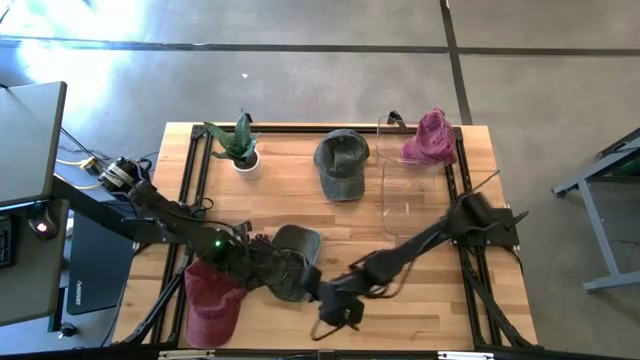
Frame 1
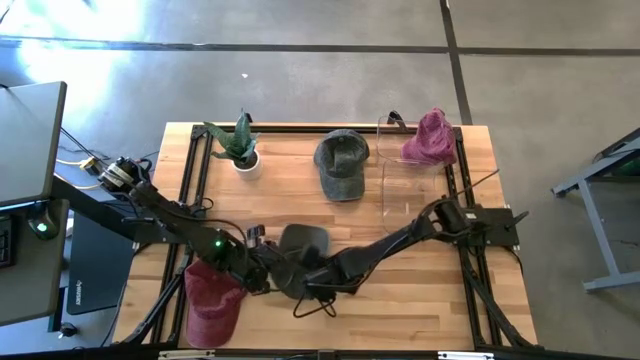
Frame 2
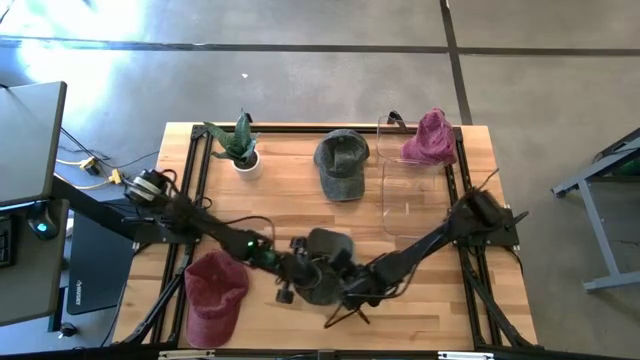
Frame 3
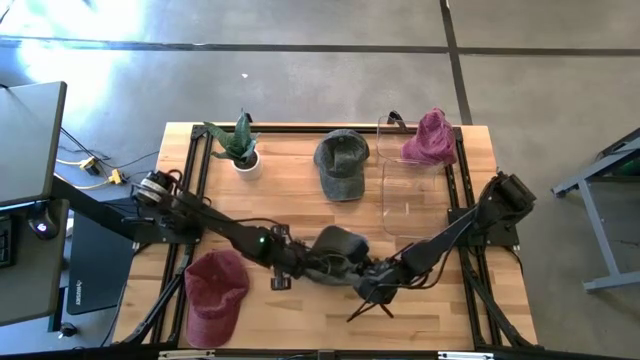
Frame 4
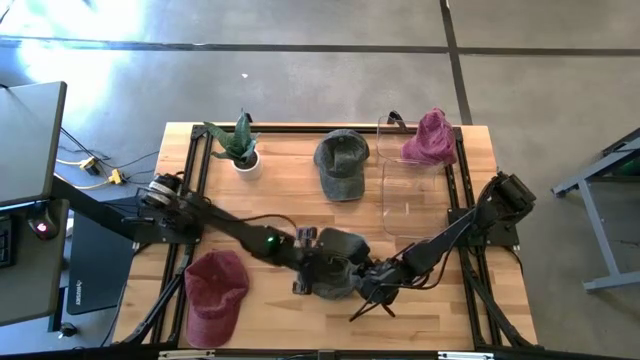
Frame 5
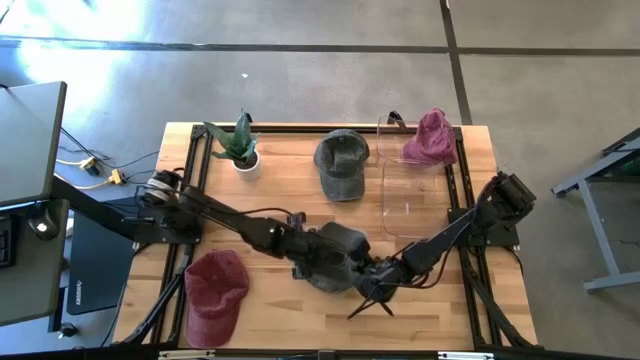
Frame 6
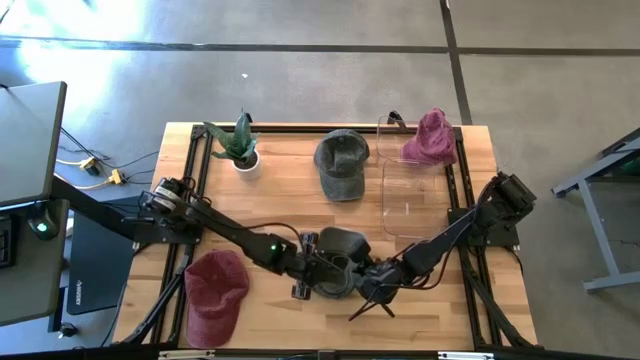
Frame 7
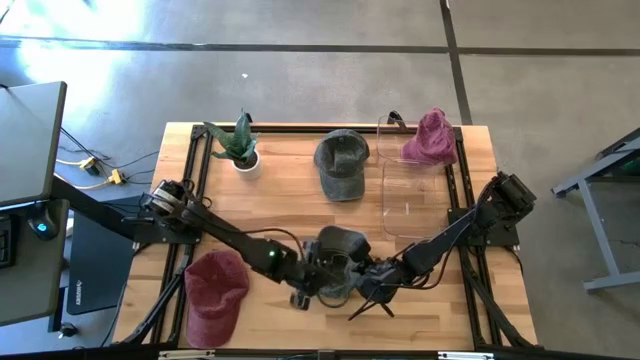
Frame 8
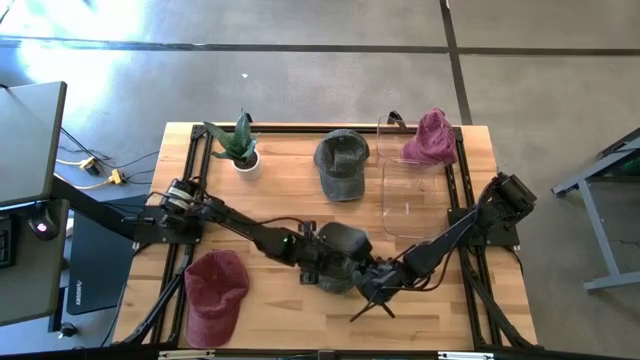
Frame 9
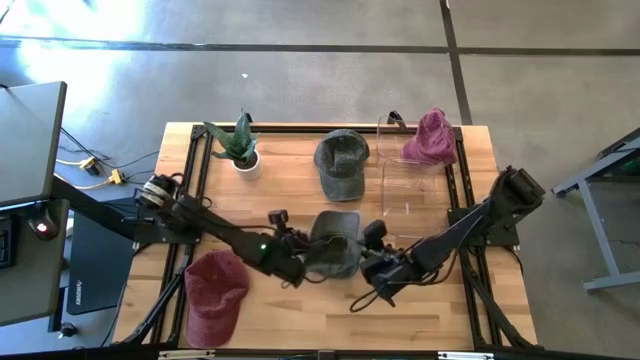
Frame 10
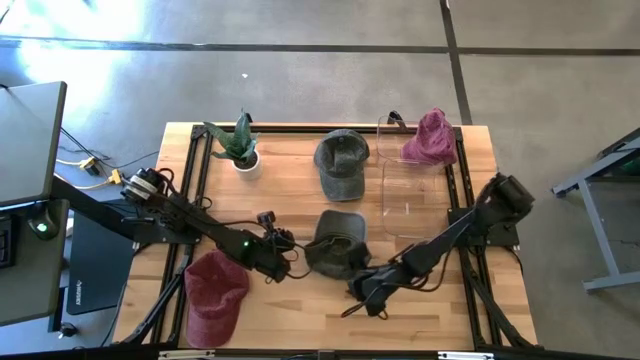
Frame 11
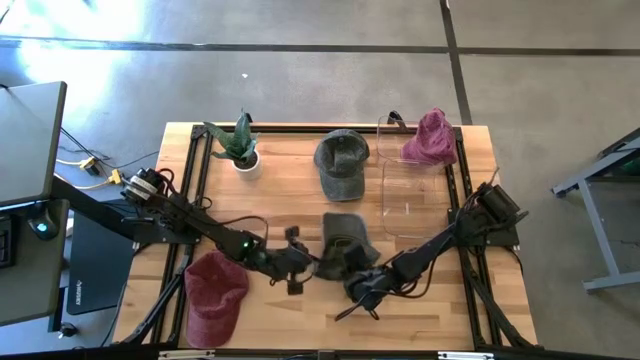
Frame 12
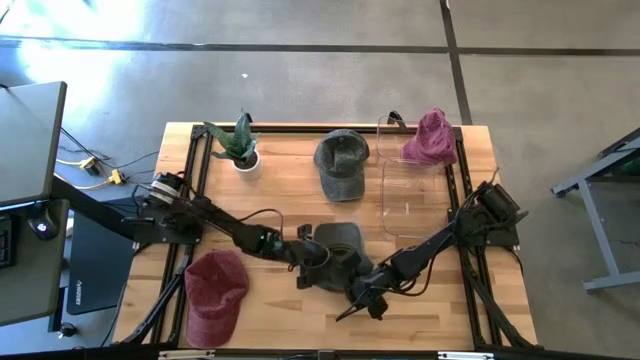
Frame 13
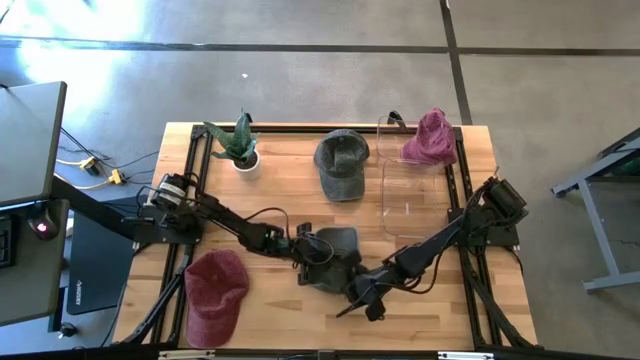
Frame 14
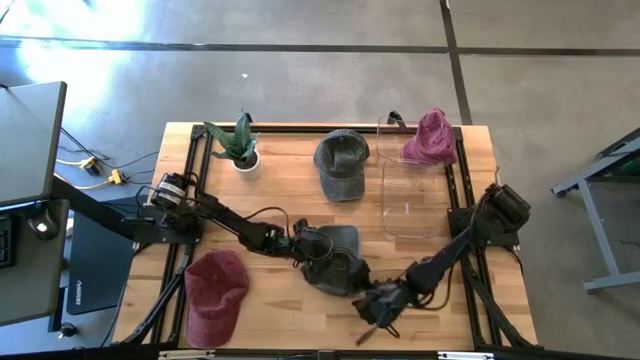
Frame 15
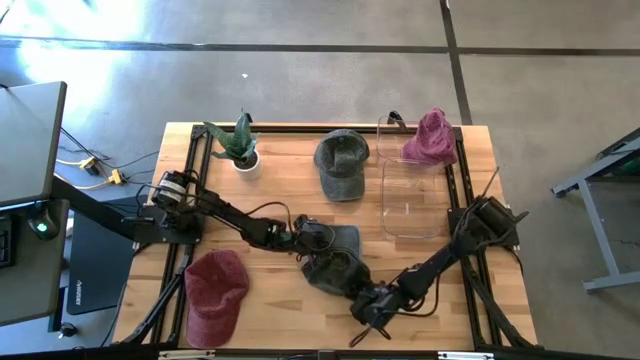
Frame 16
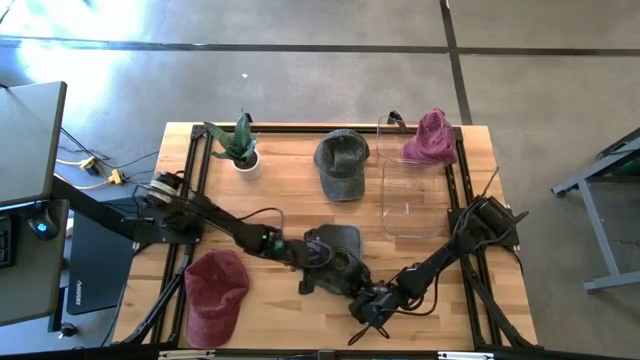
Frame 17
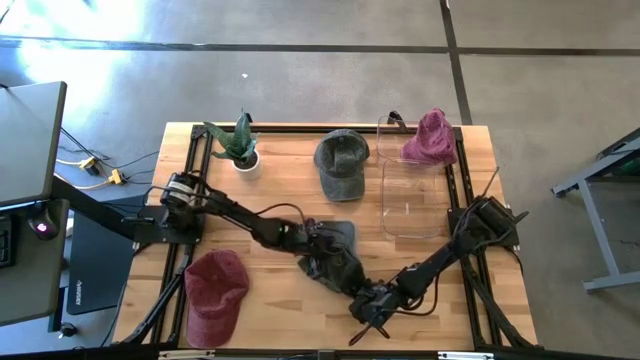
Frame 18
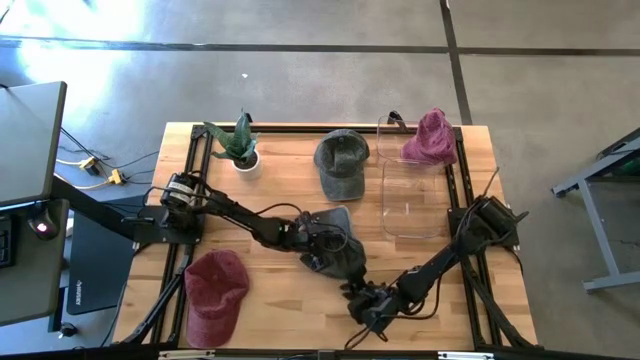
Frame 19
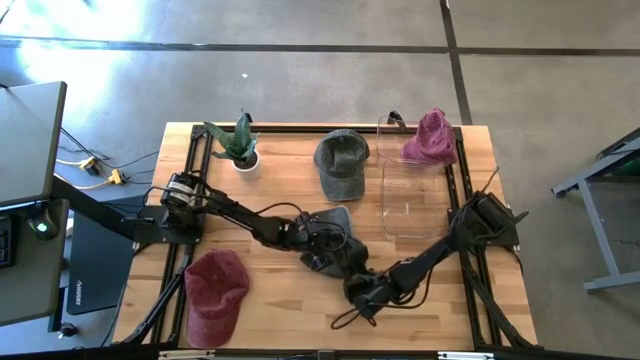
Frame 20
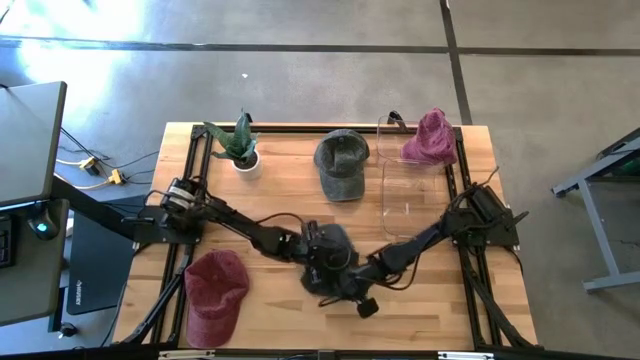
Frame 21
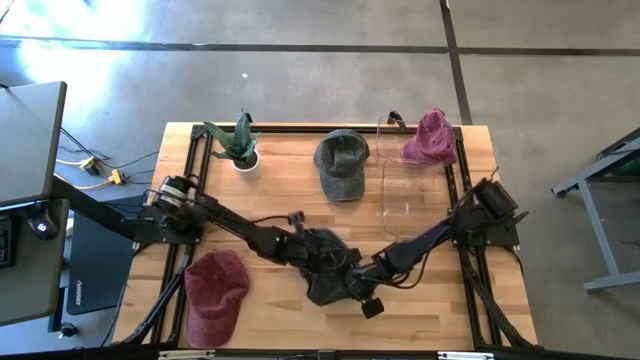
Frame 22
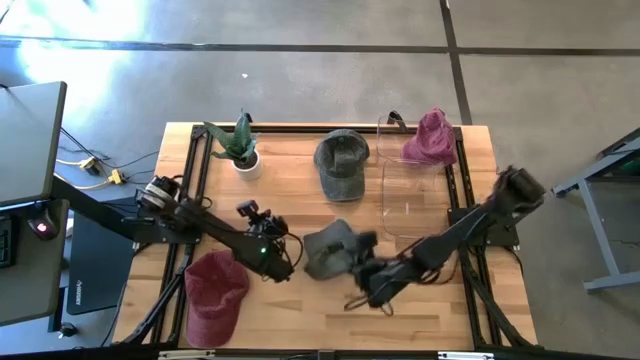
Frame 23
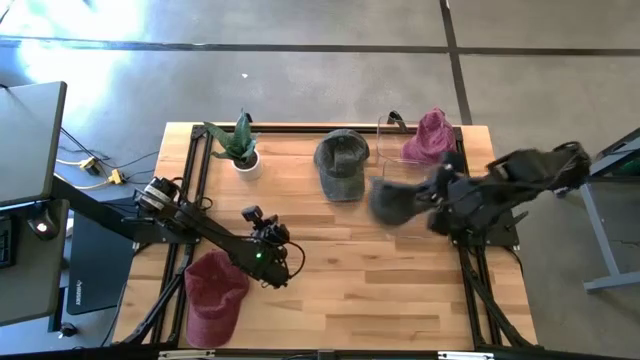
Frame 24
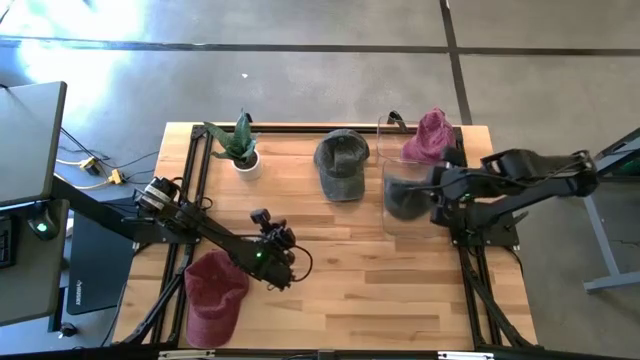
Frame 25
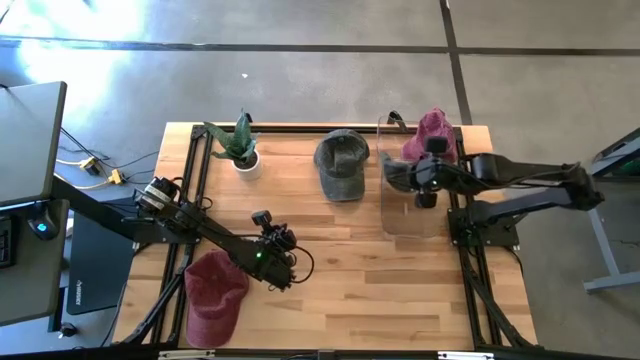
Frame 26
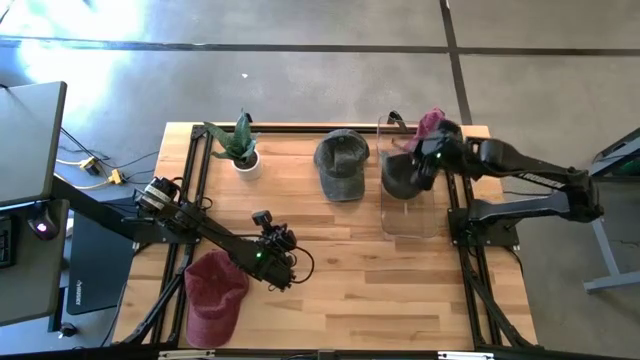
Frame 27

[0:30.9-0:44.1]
Task: Pick & Place hat
Put the bottom gray cap into the bottom transparent bin

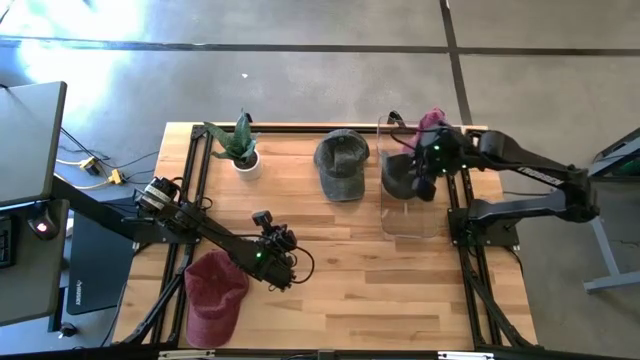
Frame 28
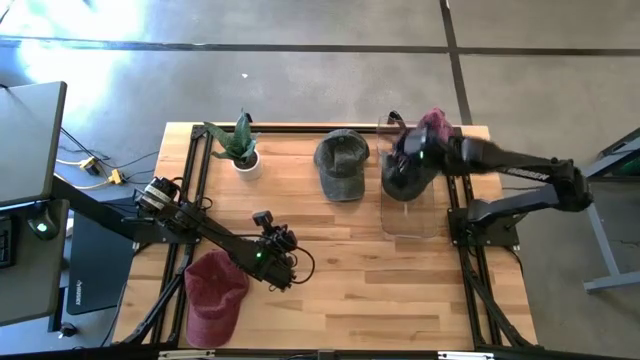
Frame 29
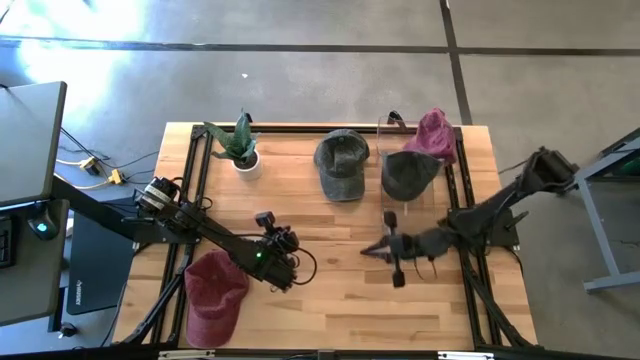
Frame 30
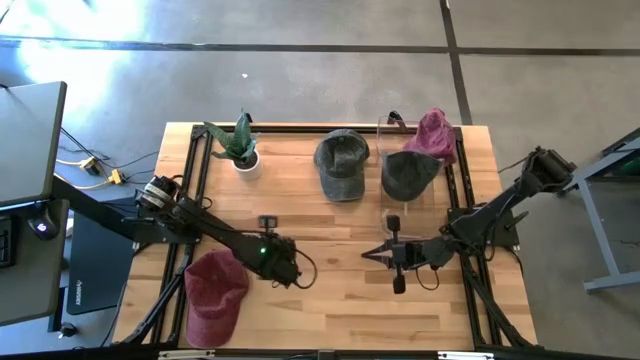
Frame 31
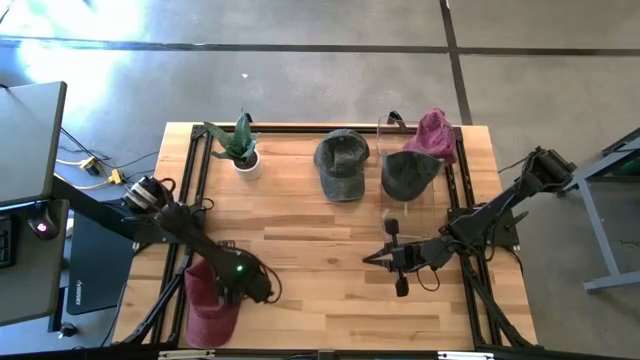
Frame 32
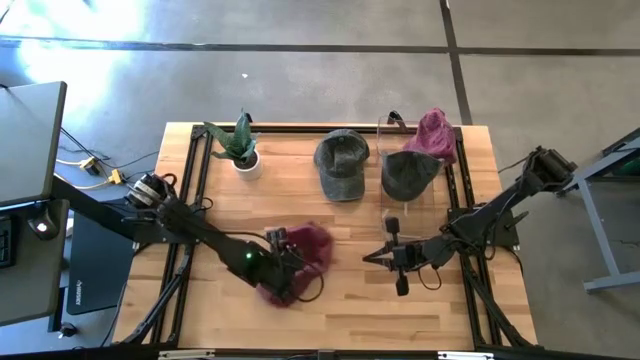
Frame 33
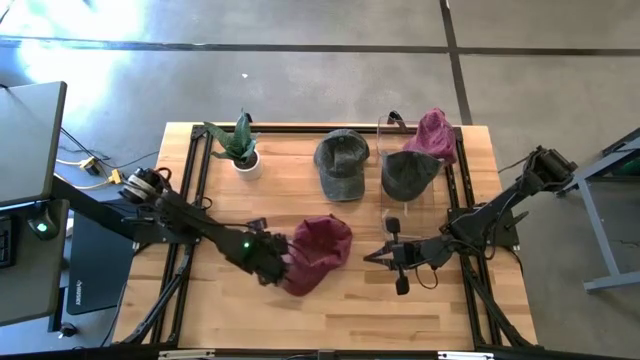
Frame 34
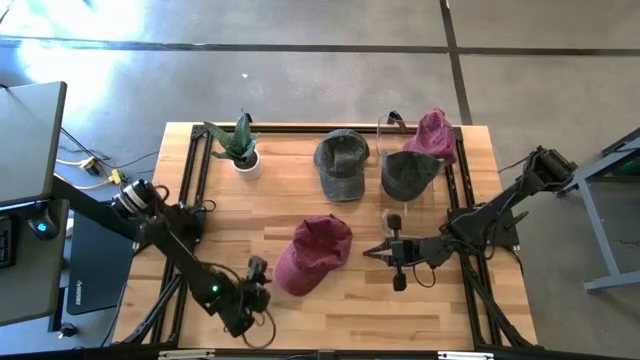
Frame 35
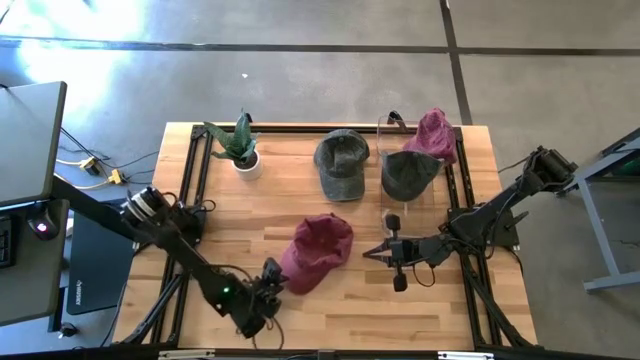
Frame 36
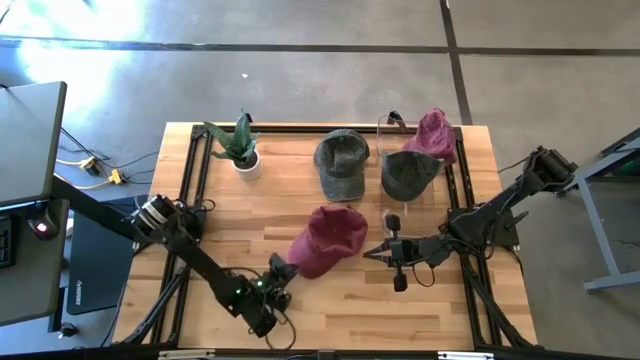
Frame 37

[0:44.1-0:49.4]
Put the red cap into the top transparent bin

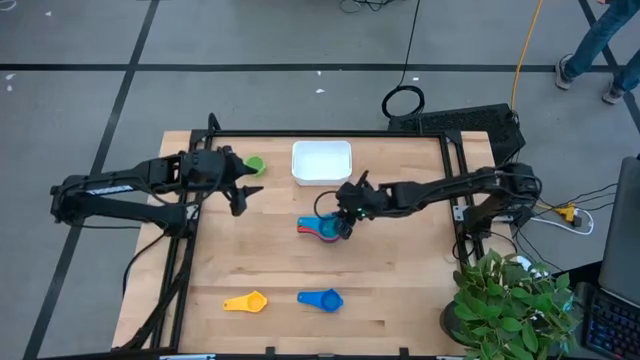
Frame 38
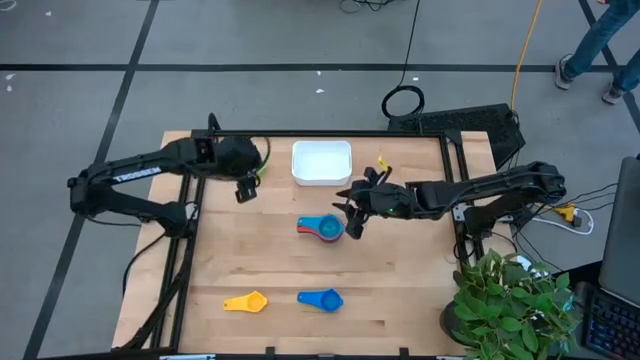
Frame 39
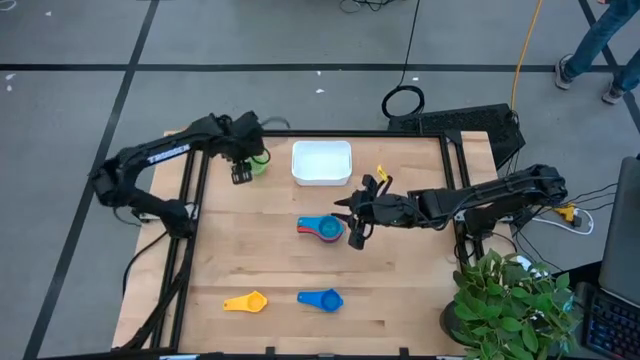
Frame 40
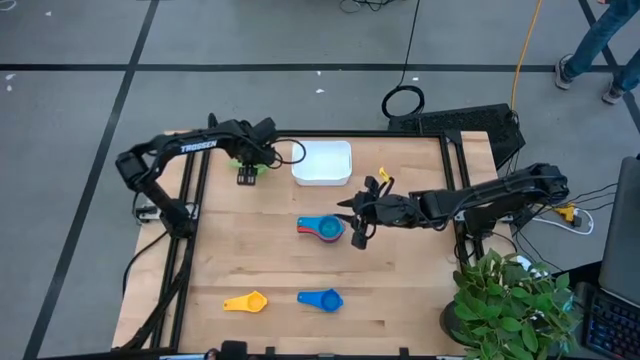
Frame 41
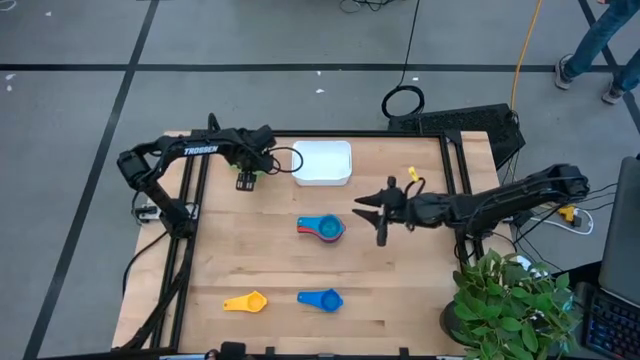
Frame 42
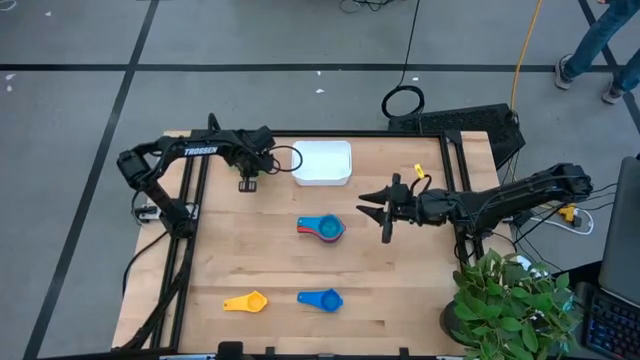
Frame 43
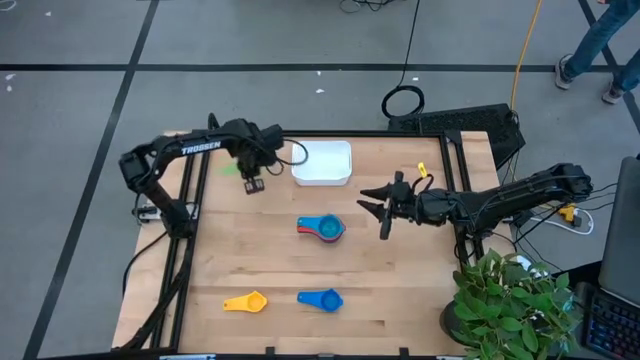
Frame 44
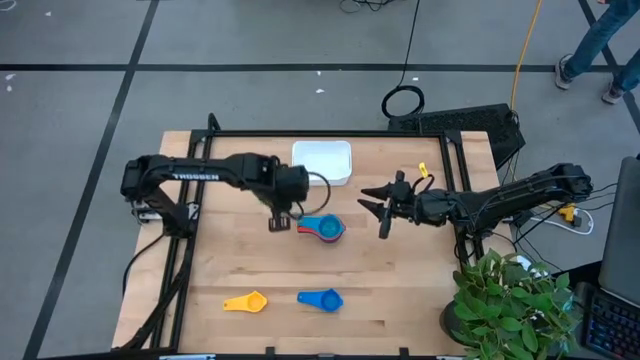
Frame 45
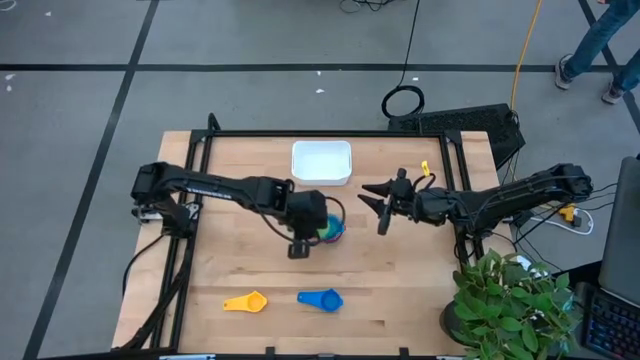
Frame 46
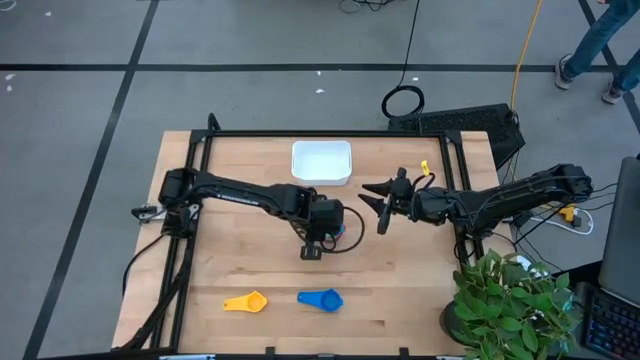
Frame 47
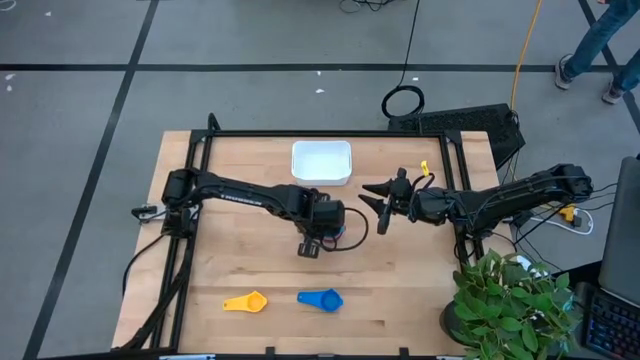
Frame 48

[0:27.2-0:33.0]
Task: Nest measuring cups in basket
Stack the green measuring cup on the blue measuring cup
